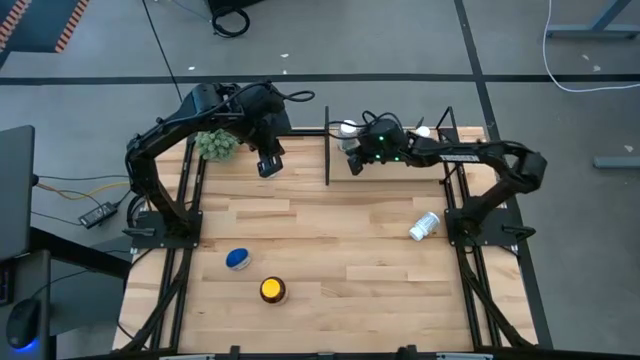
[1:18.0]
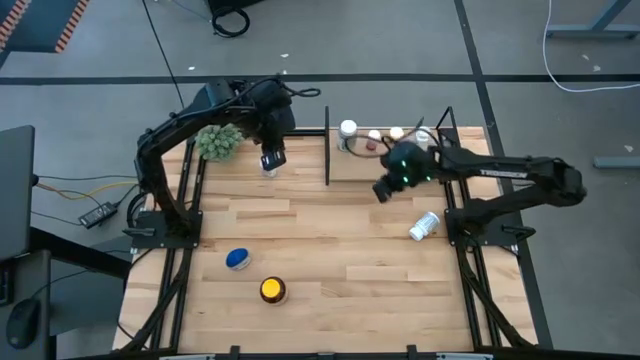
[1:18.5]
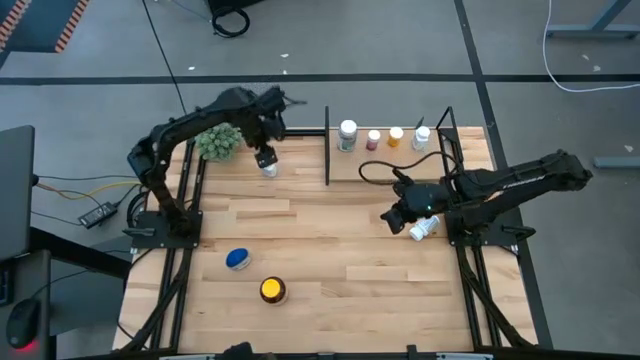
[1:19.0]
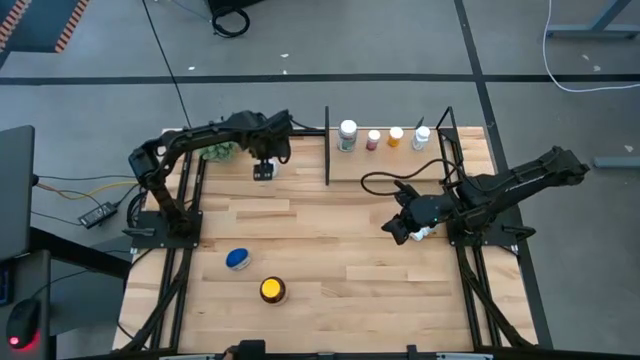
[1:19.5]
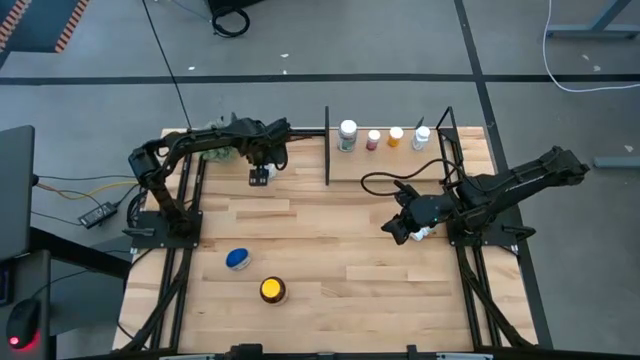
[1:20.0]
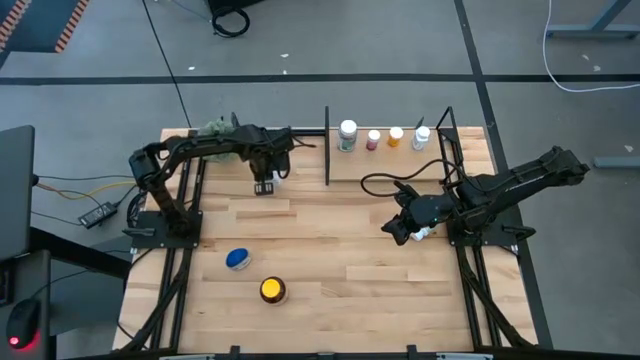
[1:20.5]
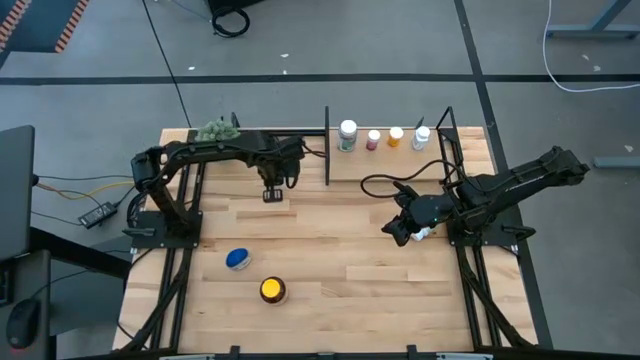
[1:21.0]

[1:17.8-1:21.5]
Task: Pick and place medicine bottles onto shelf by color
Put the white blue pill bottle on the shelf

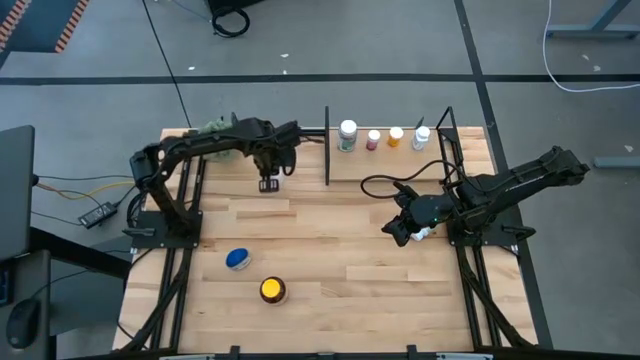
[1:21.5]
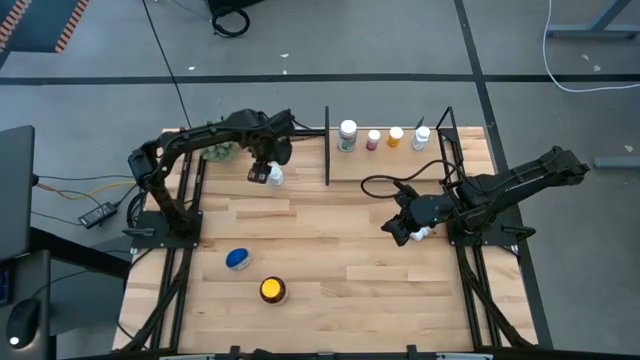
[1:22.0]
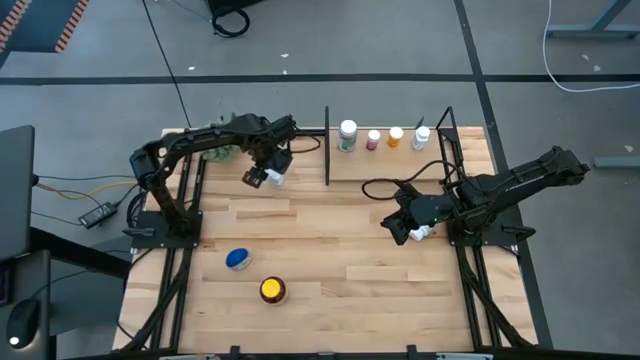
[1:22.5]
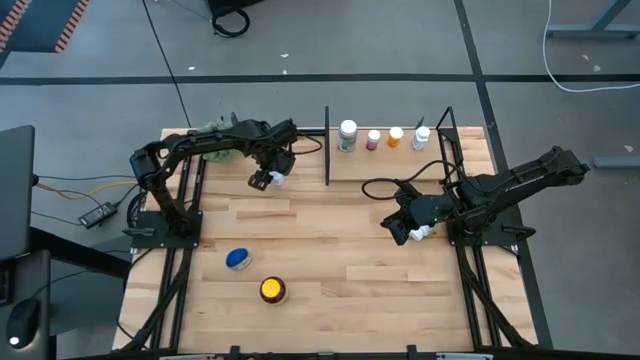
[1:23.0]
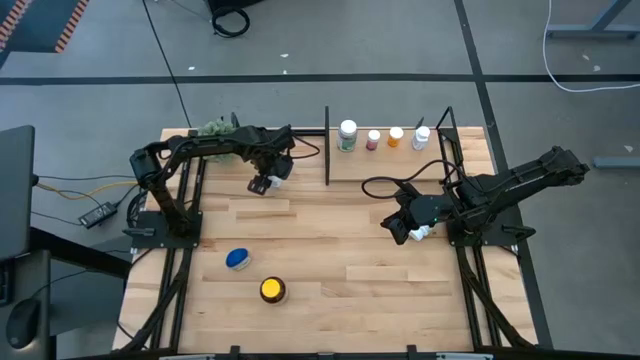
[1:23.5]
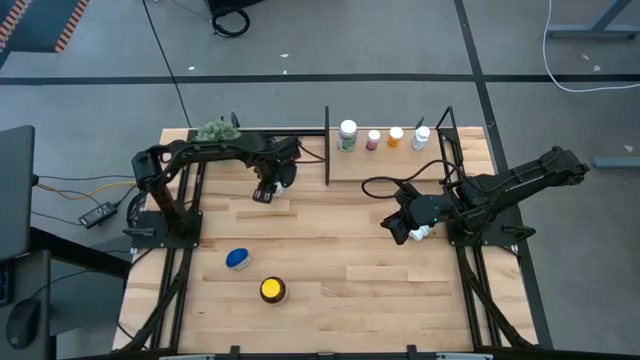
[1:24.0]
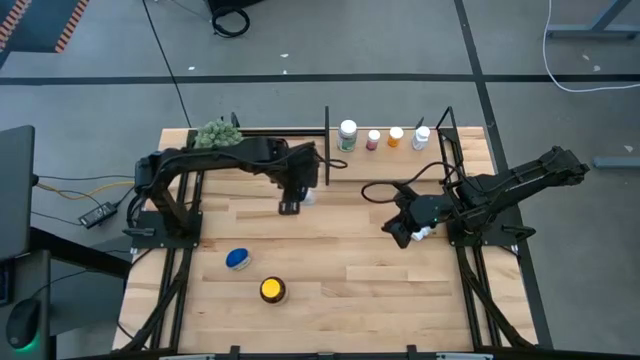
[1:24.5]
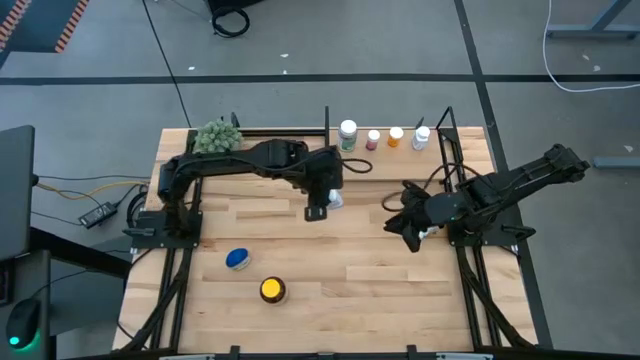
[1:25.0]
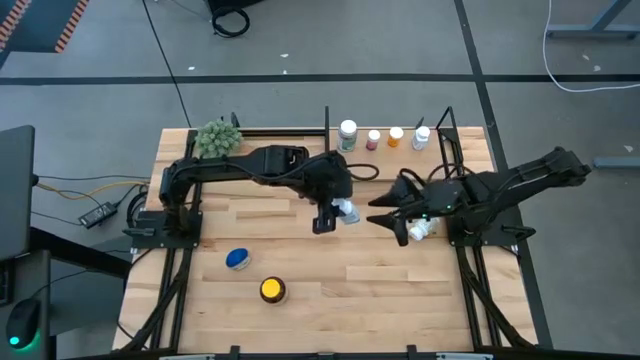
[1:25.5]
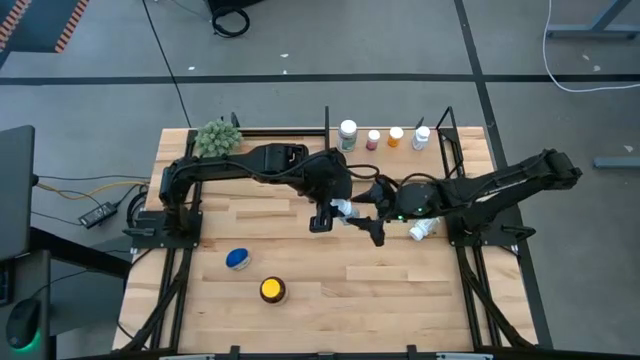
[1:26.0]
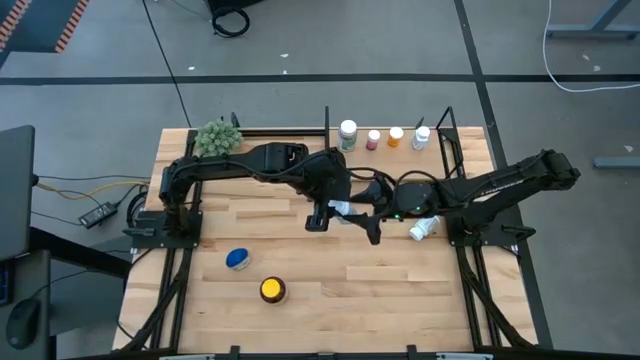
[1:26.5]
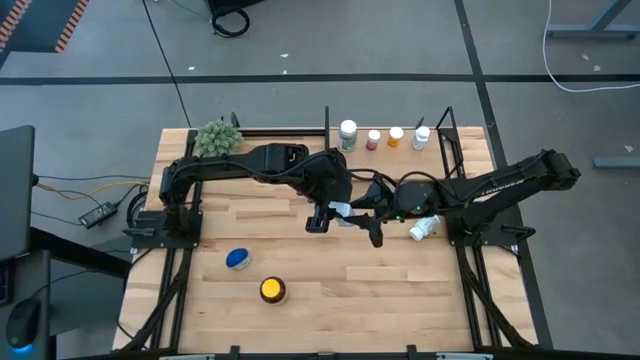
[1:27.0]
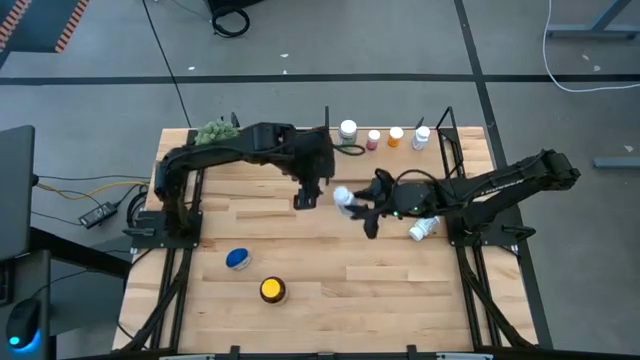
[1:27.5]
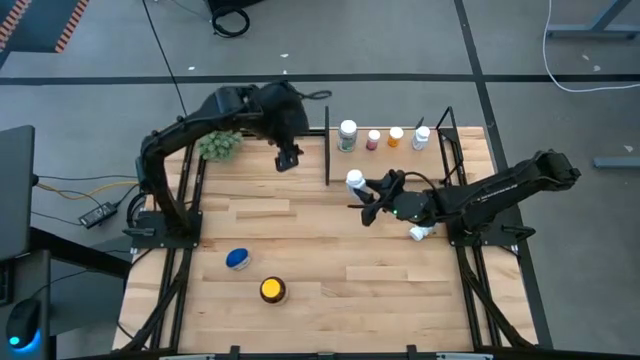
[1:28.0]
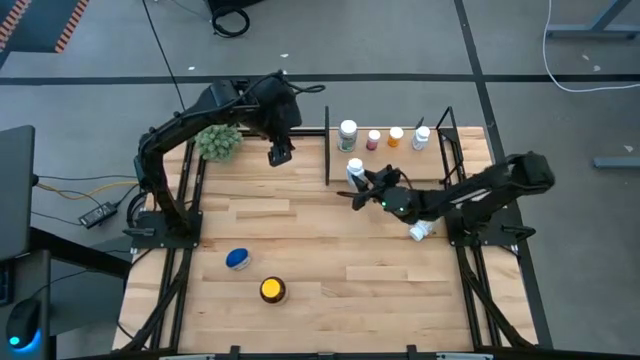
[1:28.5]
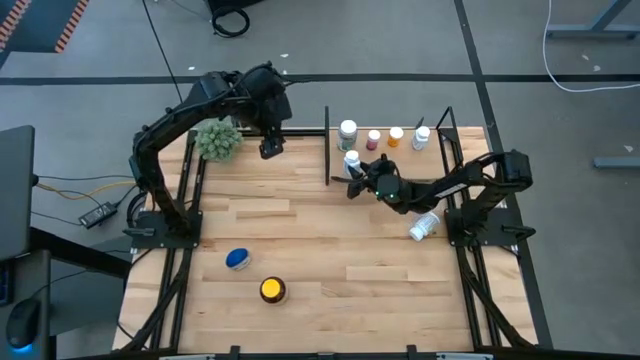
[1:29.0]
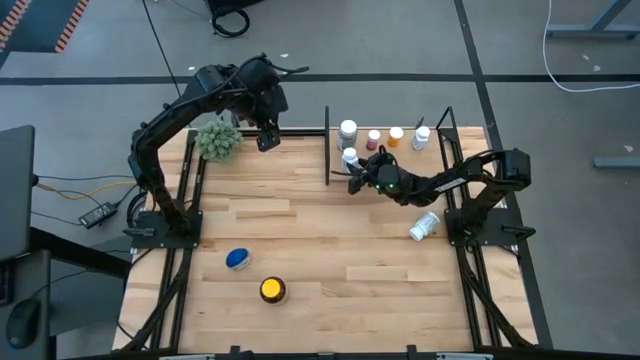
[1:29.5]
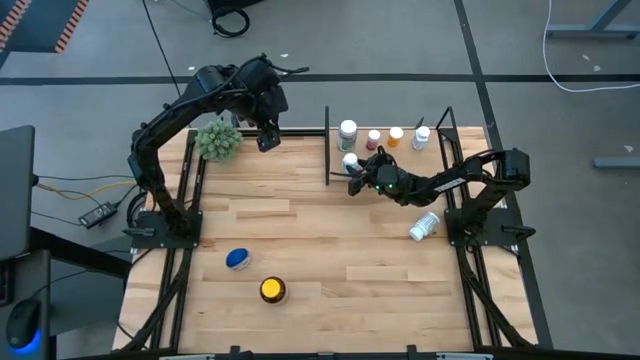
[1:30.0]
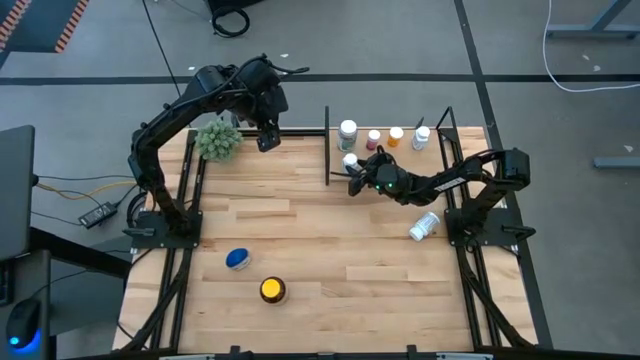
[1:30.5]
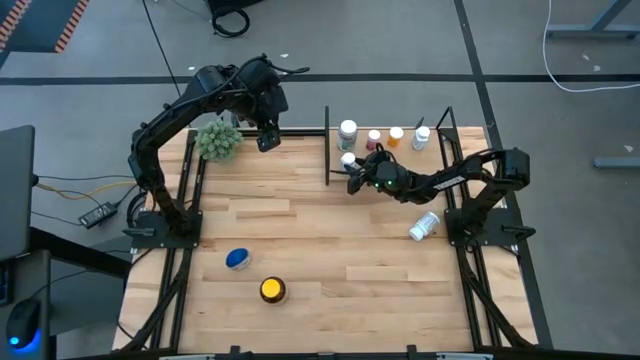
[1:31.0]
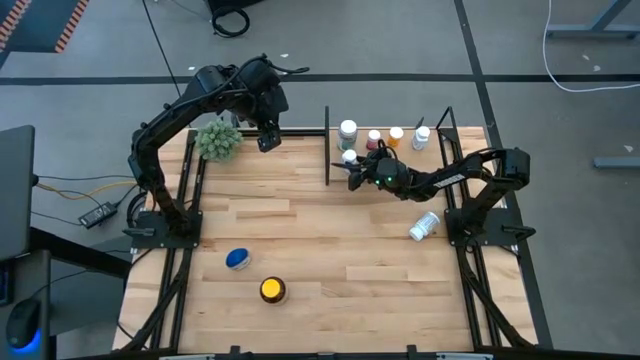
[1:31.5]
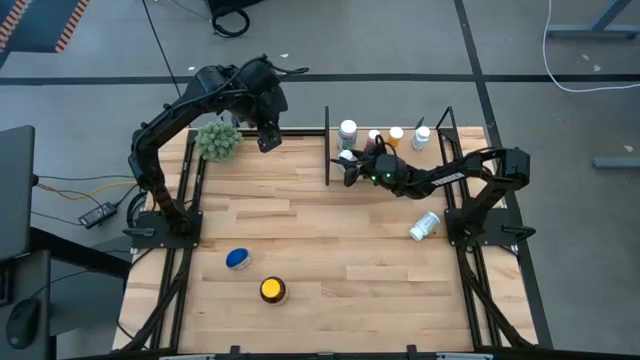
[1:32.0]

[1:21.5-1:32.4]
Put the white blue pill bottle on the shelf

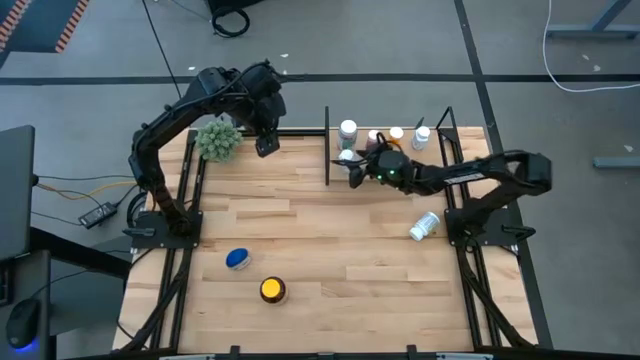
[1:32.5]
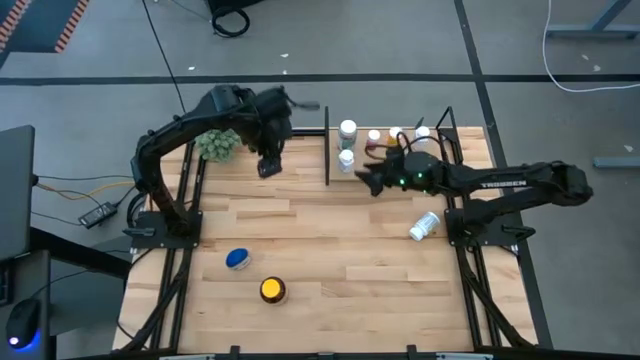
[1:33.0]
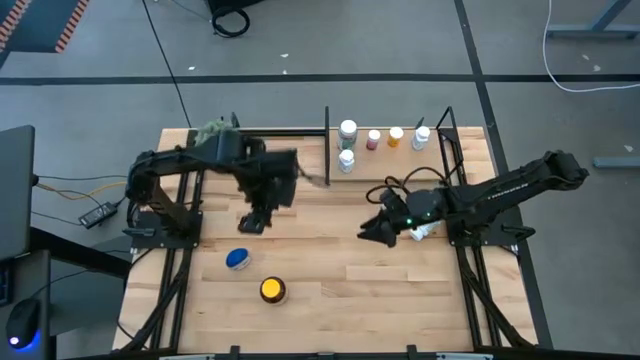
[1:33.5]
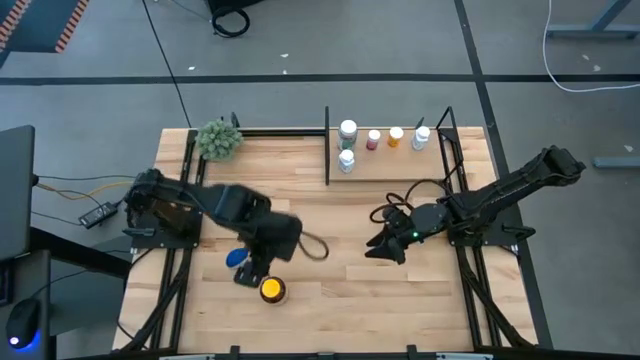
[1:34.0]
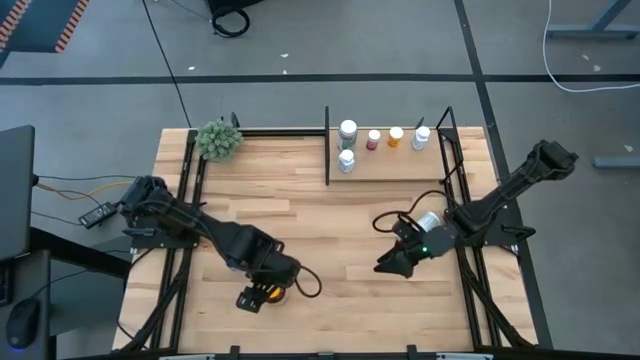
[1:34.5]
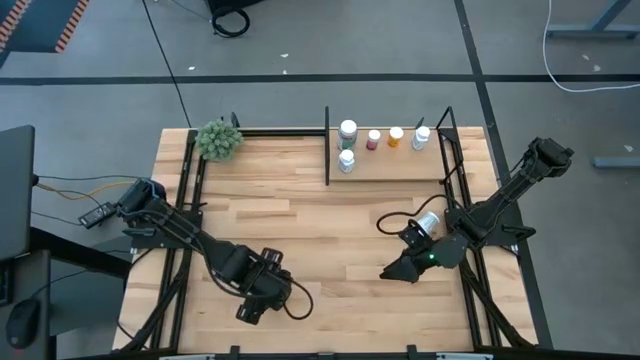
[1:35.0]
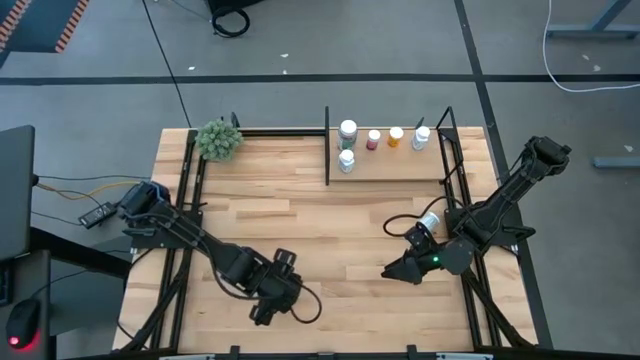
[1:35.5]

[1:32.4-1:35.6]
Put the yellow pill bottle on the shelf

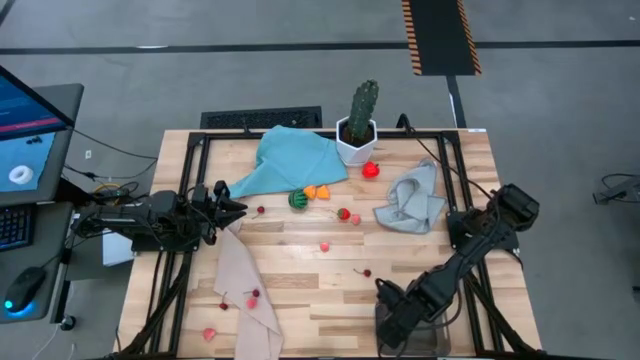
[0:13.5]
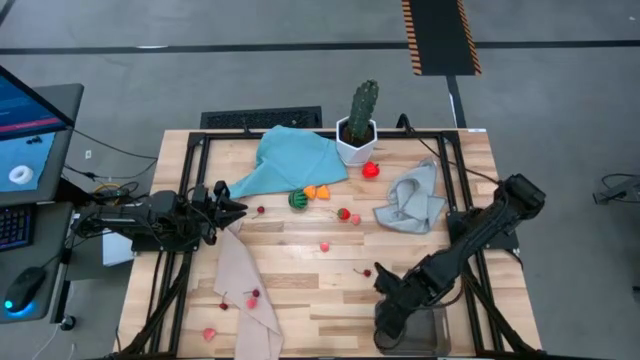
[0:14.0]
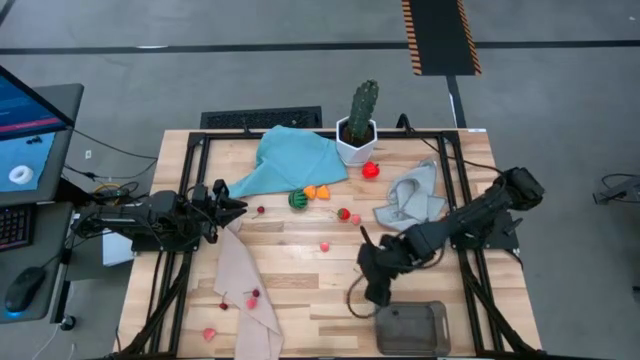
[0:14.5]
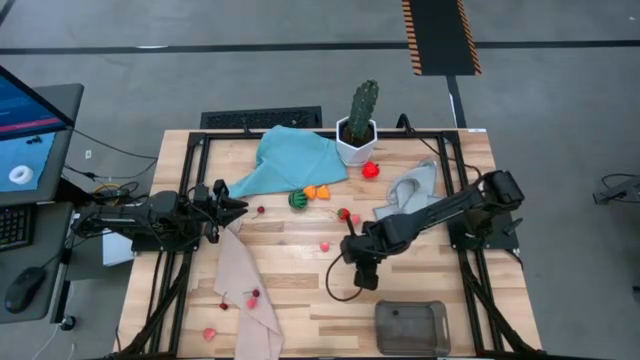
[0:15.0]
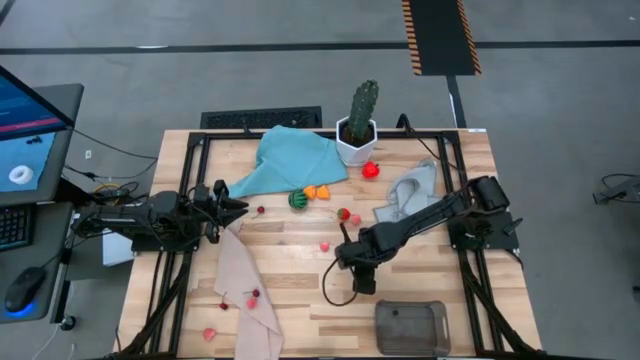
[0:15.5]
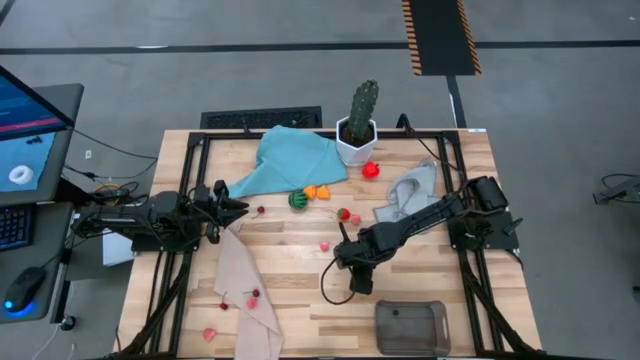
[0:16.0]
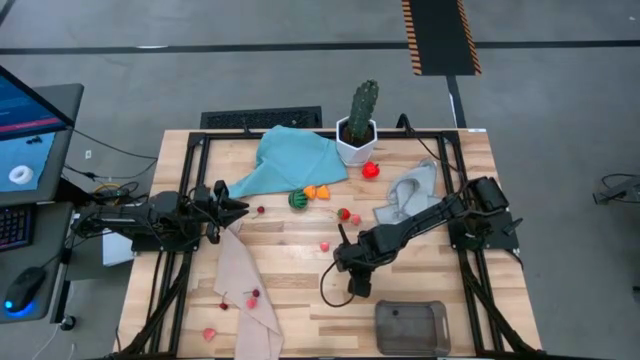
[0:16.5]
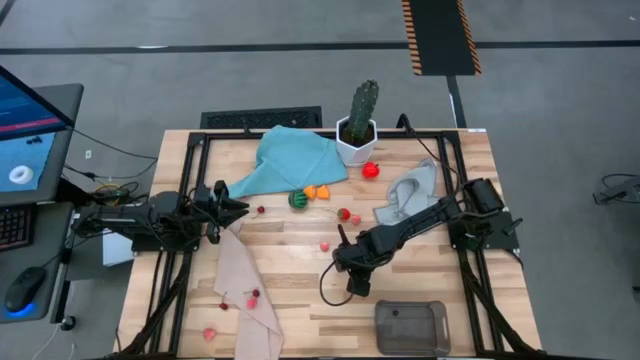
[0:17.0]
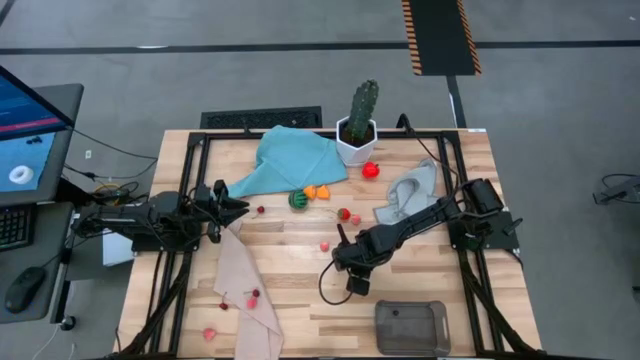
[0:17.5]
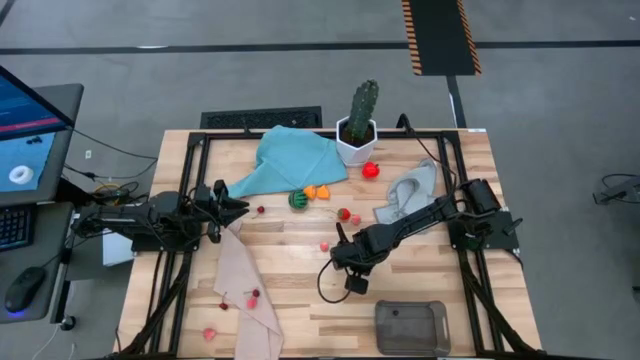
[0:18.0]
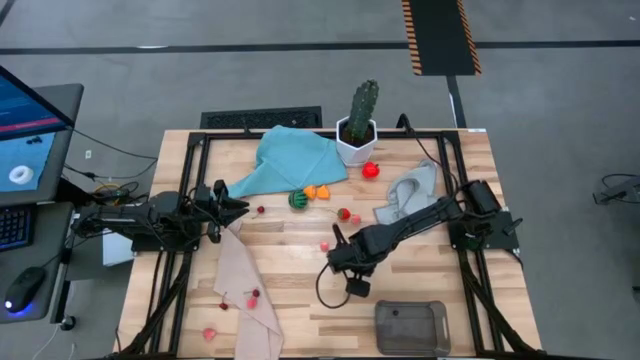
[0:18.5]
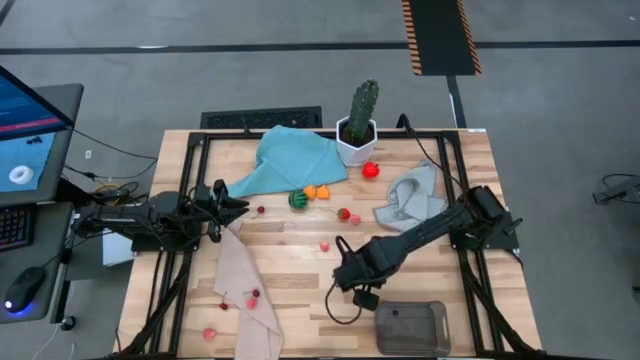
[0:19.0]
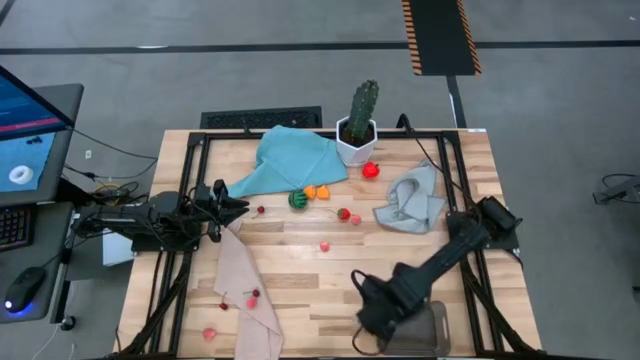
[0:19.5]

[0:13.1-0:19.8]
Task: Pick and placing Produce into tupperware
Put the cherry into the black bin
